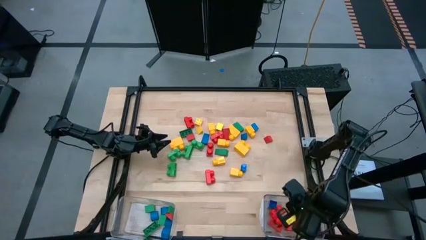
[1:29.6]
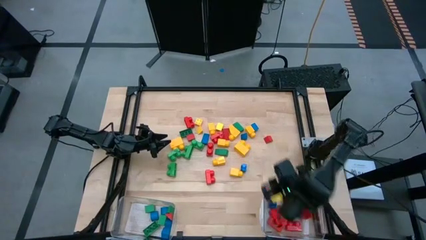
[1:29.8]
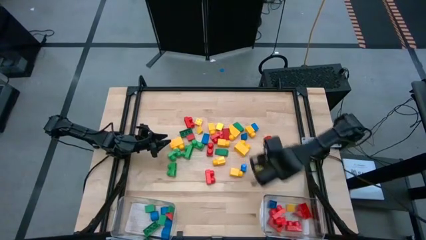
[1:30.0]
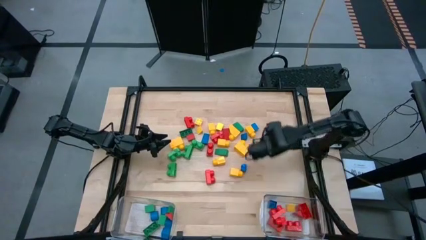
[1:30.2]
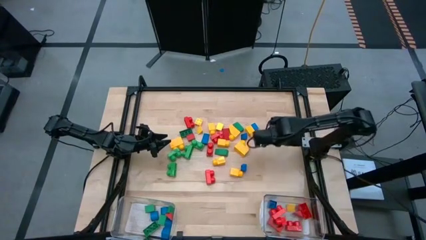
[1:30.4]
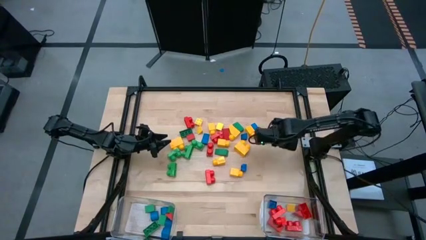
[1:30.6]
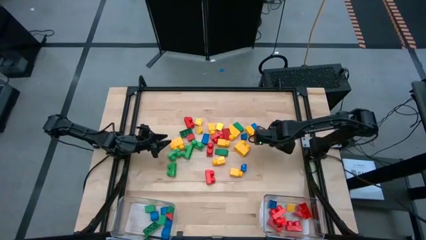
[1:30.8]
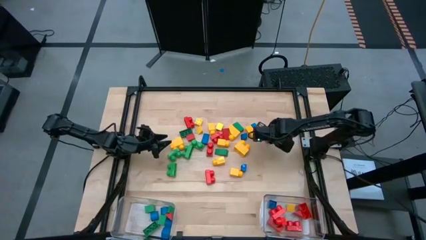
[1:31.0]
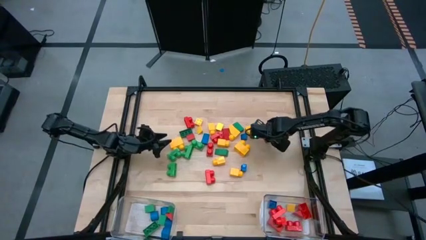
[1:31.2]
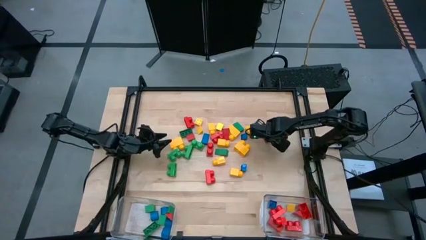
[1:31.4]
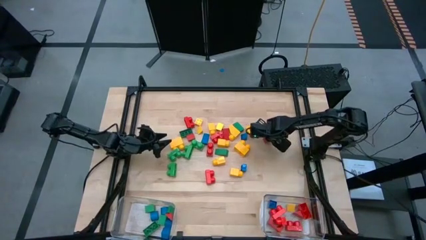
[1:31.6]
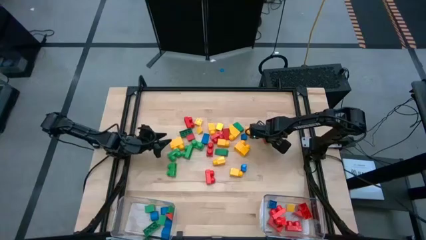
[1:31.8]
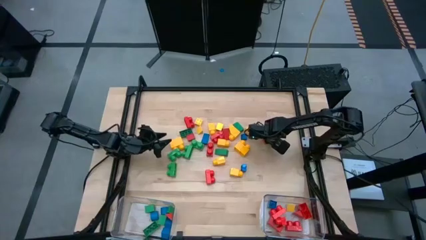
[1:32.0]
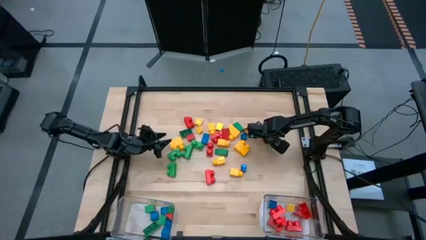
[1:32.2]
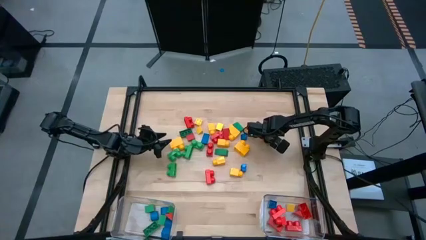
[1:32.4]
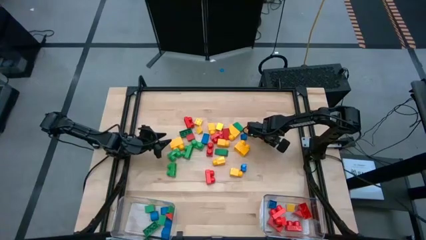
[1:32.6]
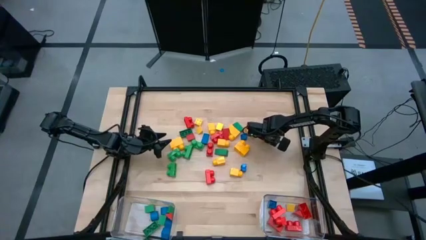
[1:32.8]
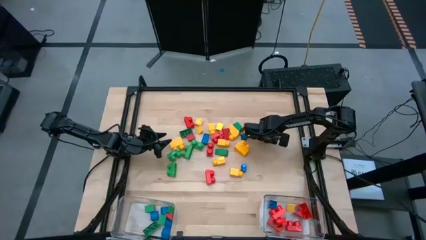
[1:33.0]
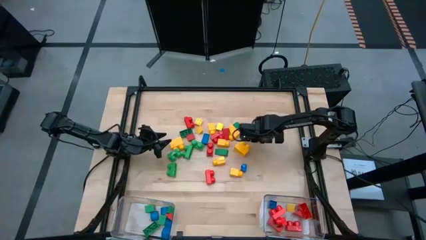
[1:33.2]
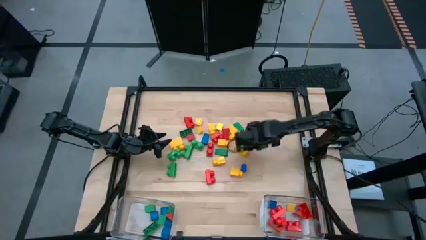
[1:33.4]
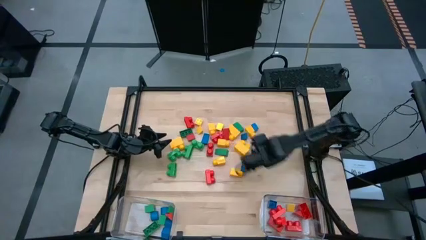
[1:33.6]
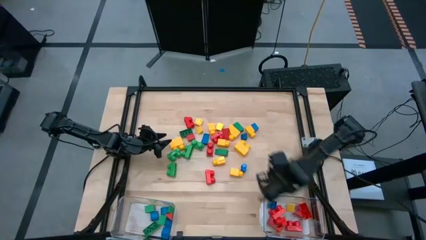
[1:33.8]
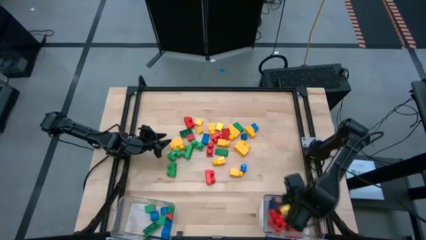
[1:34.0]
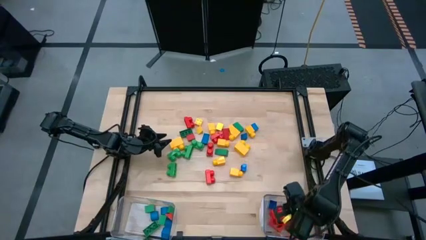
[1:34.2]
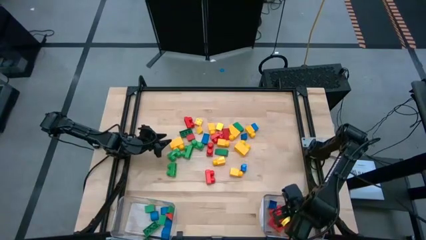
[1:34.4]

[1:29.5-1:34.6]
Task: Sort blocks by size
Put the red triangular block into the right transparent bin

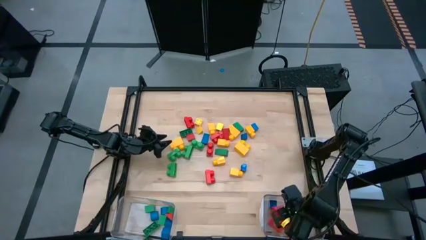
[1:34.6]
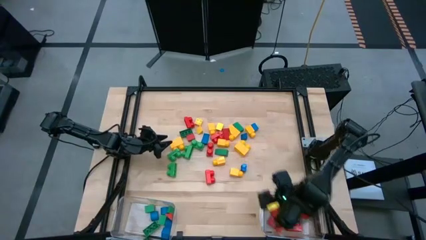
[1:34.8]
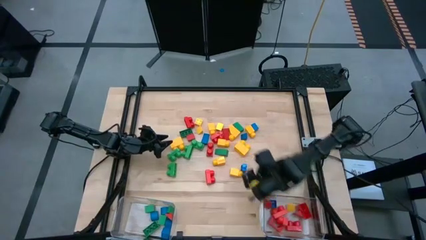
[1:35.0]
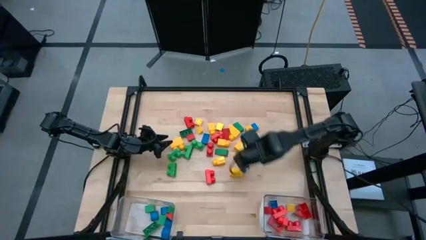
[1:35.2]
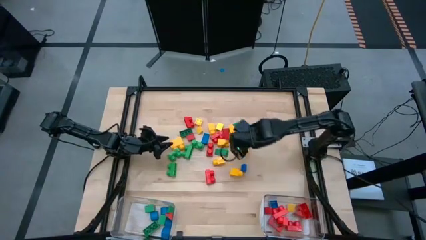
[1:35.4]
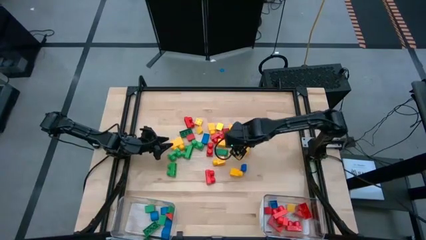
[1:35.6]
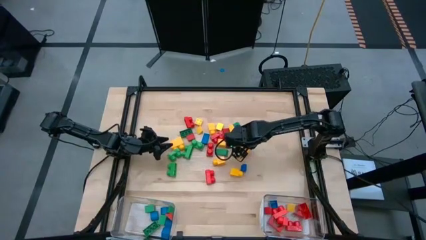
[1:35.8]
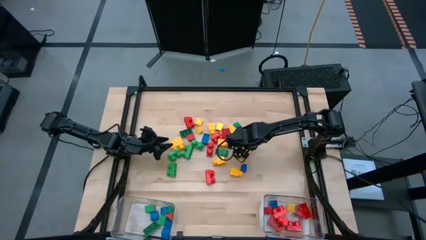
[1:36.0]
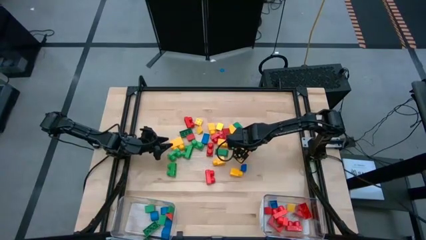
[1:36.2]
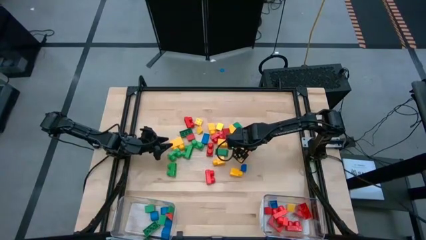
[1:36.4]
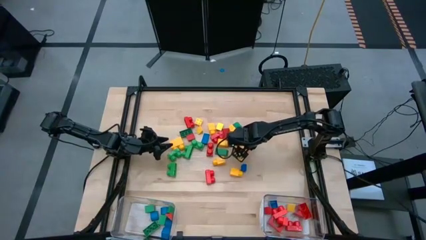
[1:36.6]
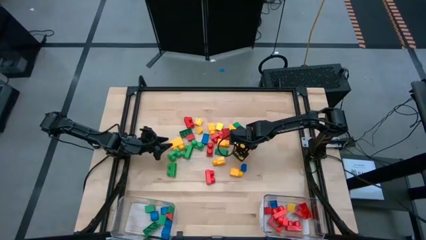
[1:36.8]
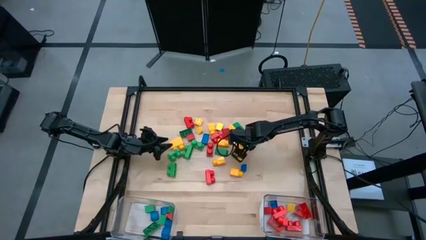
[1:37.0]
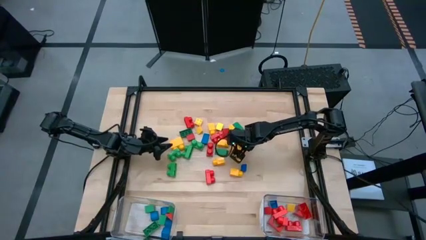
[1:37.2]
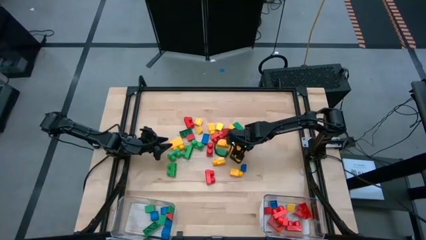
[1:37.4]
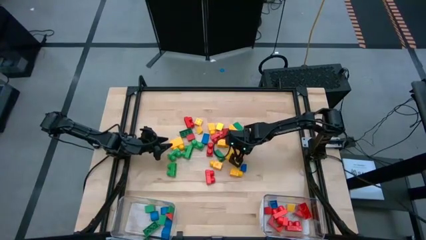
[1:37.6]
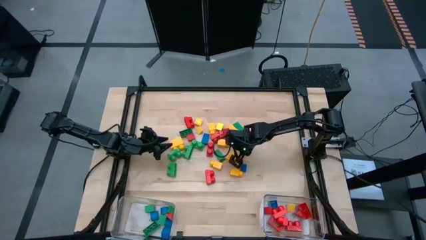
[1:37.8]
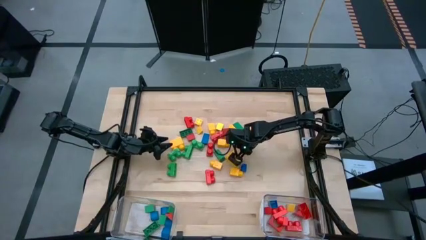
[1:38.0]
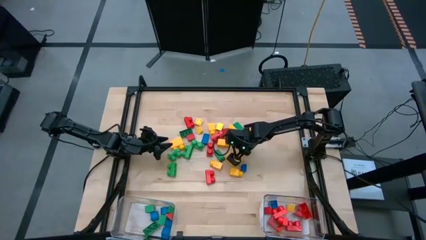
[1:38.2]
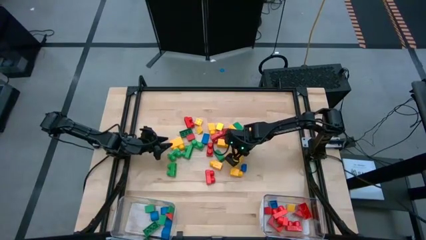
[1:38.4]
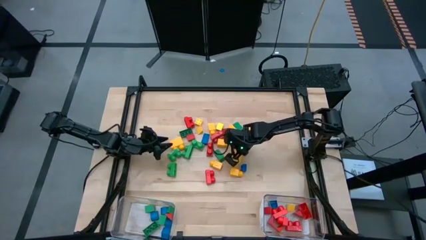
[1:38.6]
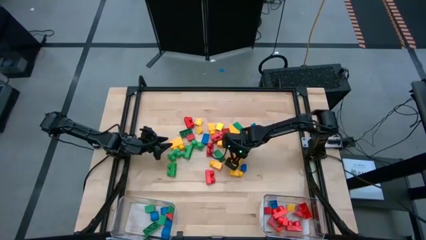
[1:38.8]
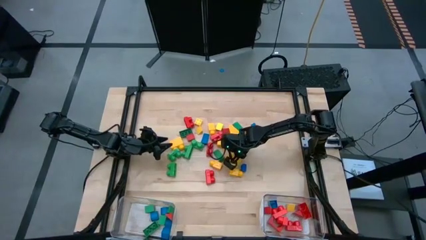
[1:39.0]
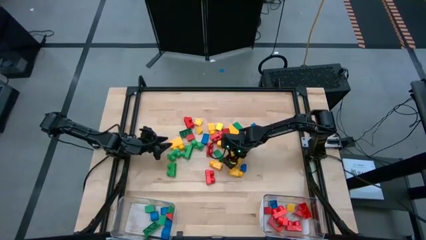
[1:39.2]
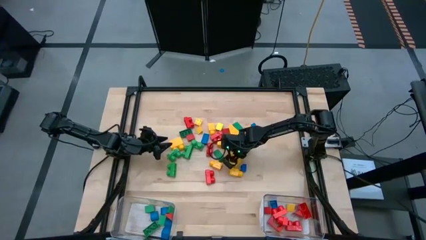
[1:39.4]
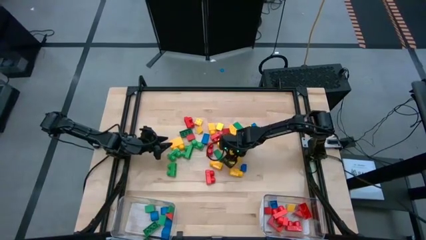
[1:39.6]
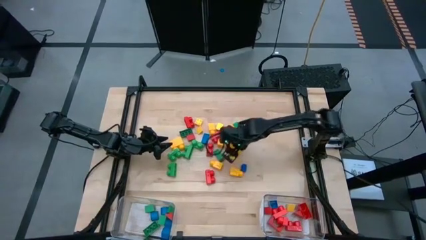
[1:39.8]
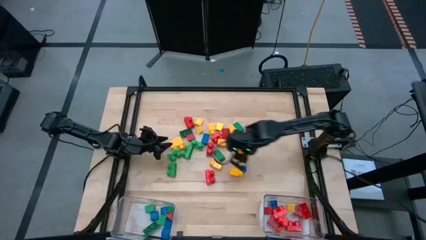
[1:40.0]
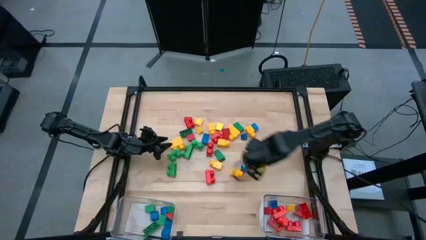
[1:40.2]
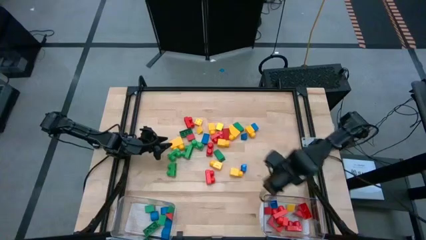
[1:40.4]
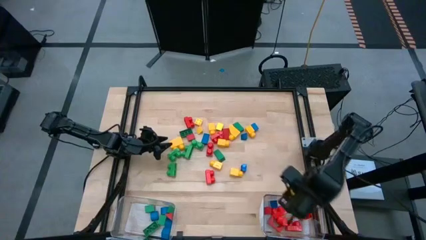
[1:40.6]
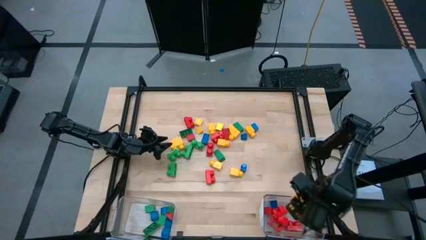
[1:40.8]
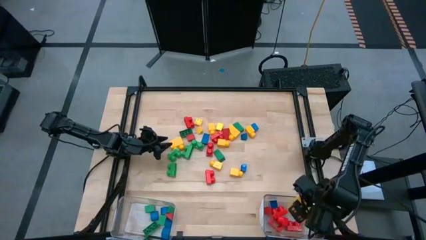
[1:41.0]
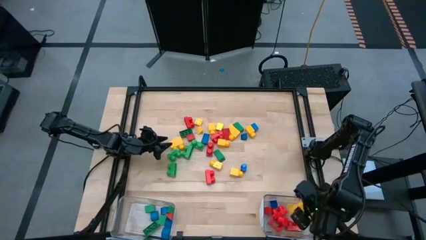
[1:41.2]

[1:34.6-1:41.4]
Put the yellow game piece into the right transparent bin

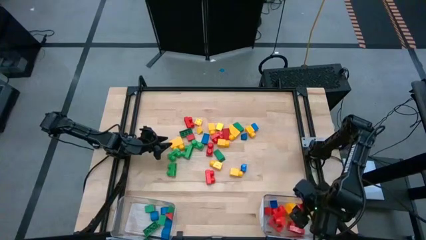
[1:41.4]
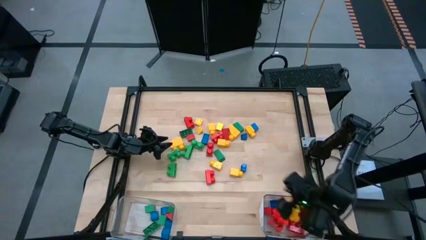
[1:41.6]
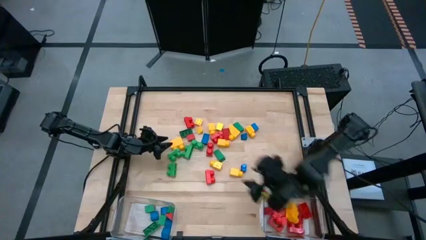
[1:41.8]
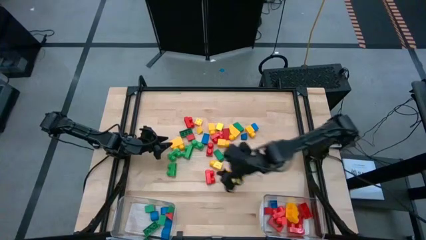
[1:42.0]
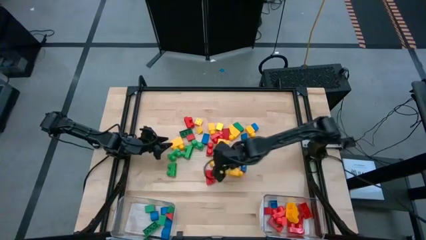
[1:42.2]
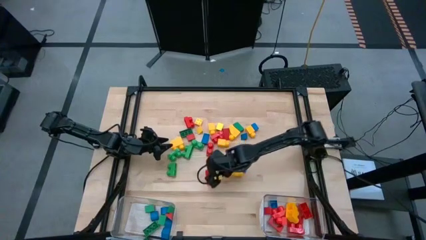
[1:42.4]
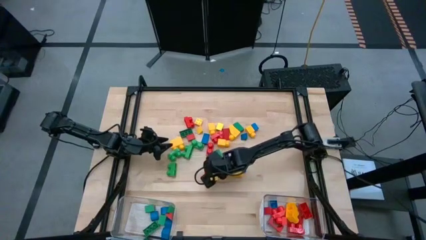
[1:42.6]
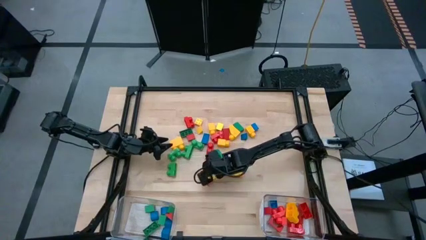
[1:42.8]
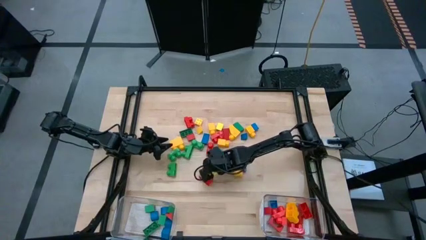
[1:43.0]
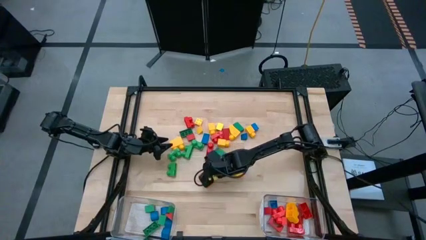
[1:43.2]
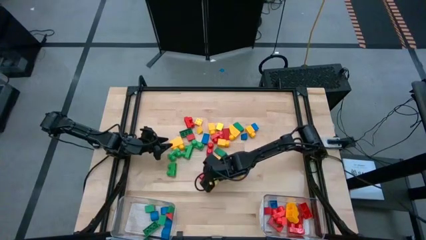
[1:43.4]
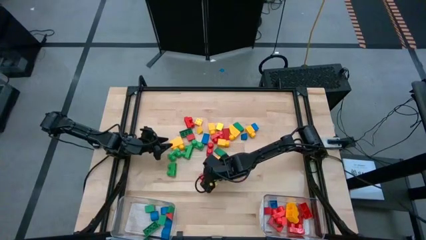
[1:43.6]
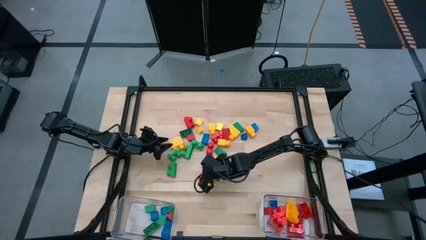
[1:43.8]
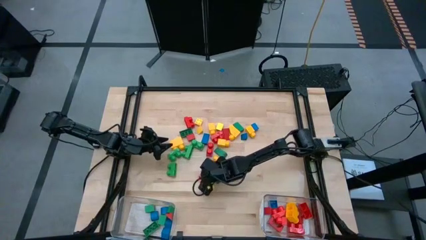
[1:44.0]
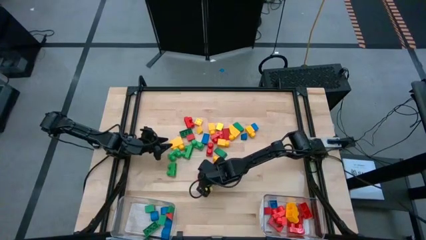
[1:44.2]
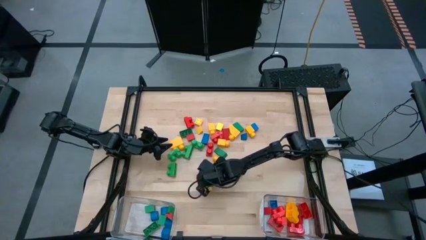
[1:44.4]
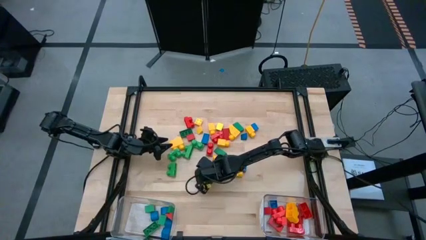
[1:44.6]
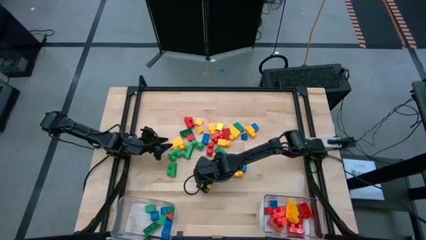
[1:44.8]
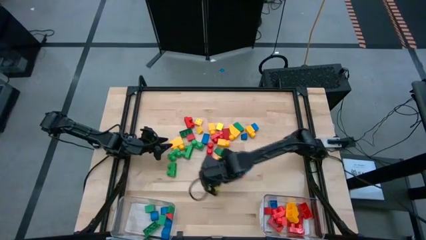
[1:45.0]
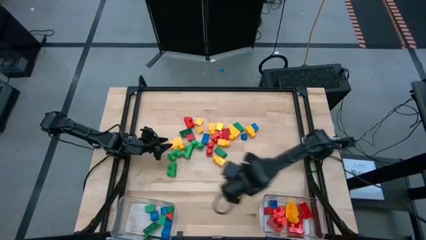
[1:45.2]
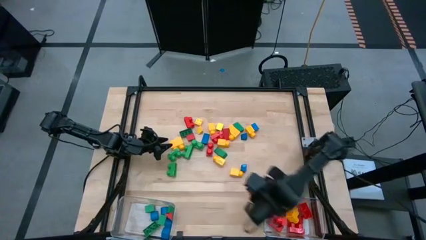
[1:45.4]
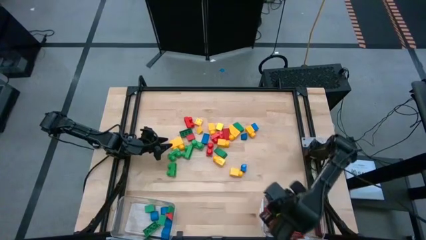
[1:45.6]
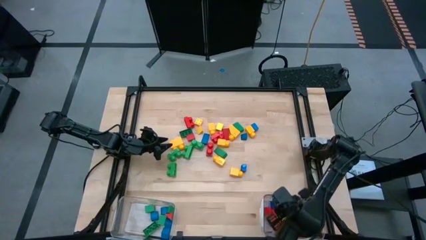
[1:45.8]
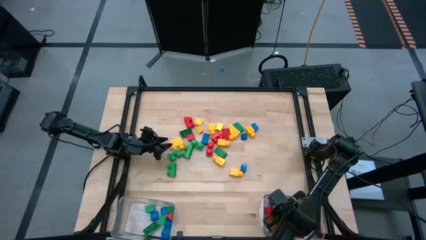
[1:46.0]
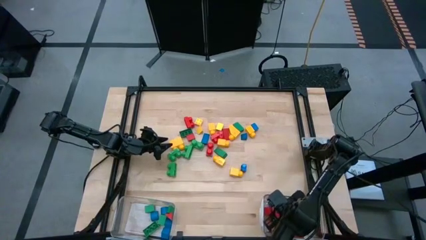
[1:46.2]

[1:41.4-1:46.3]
Put the red game piece into the right transparent bin
